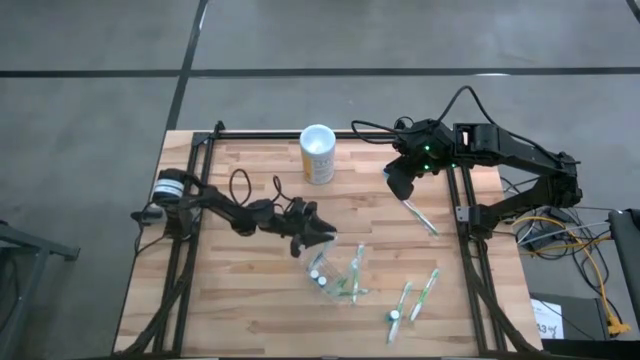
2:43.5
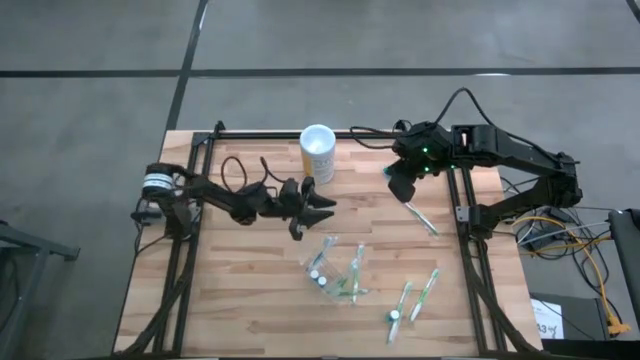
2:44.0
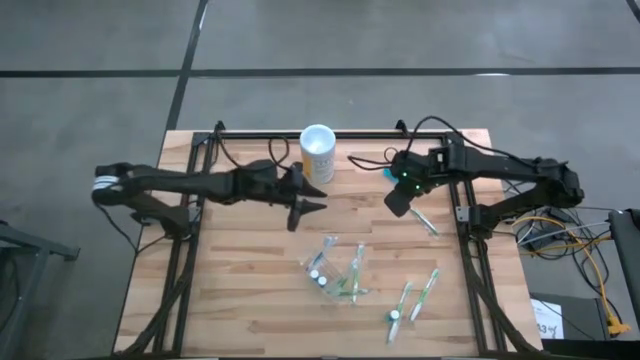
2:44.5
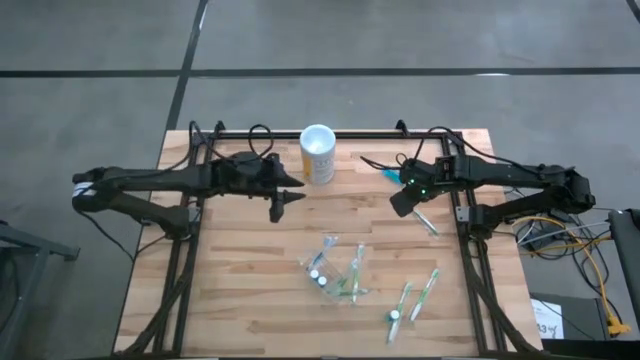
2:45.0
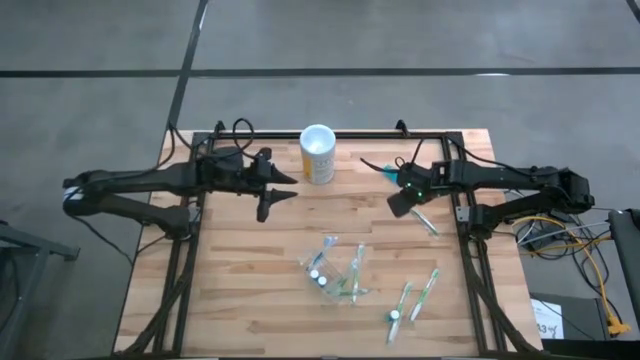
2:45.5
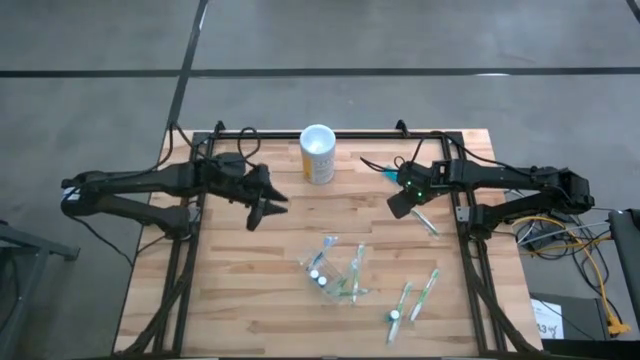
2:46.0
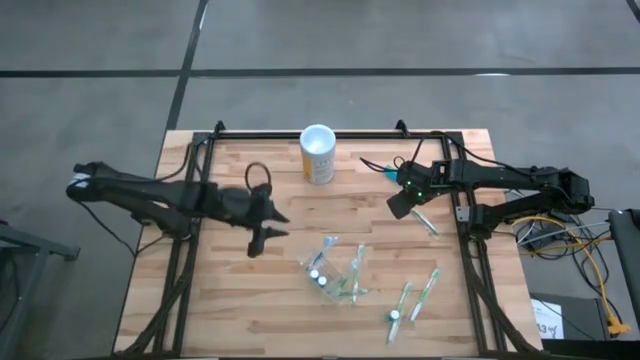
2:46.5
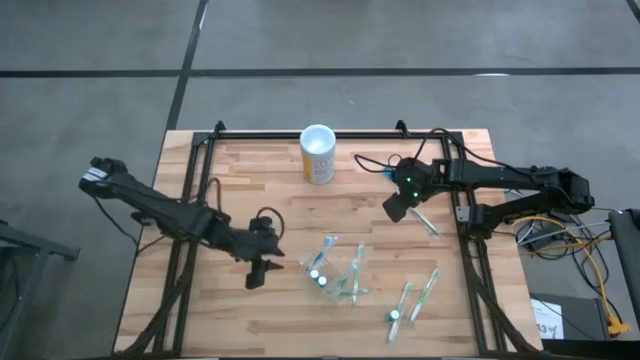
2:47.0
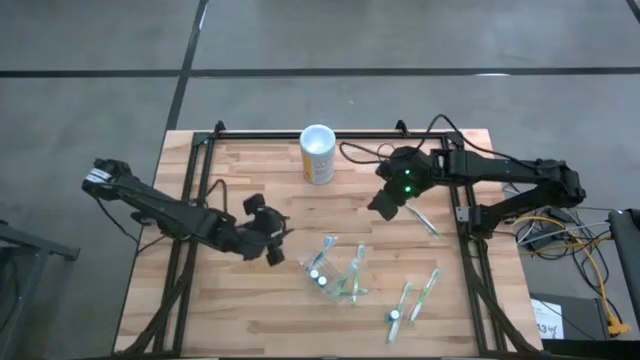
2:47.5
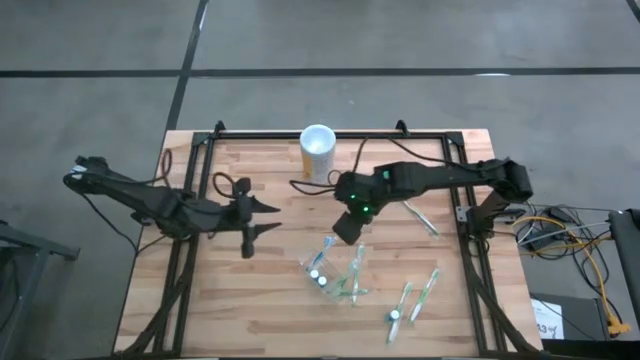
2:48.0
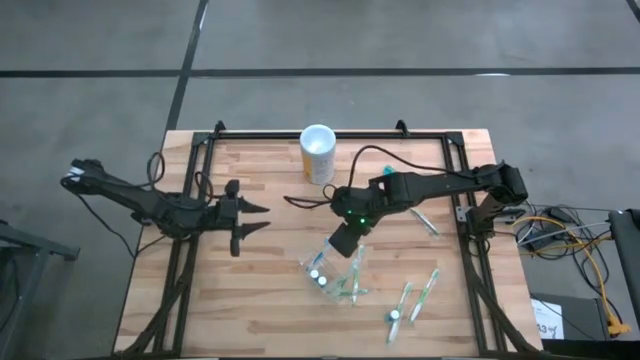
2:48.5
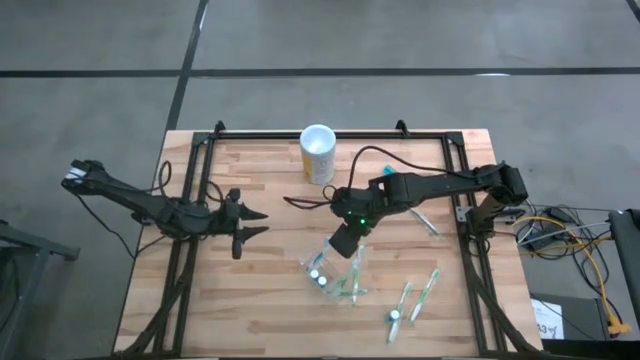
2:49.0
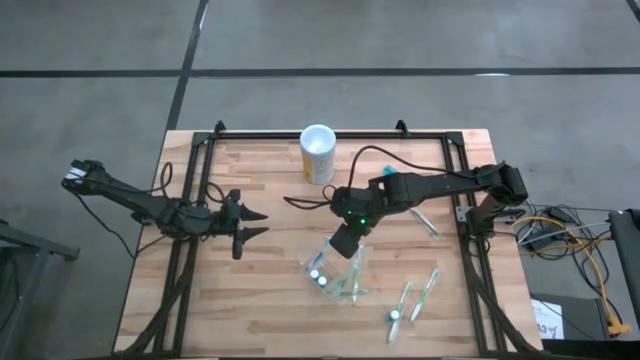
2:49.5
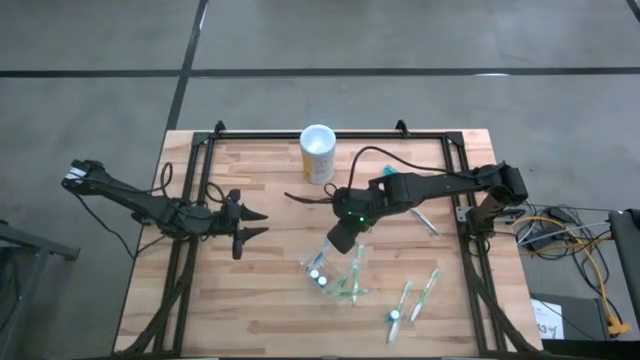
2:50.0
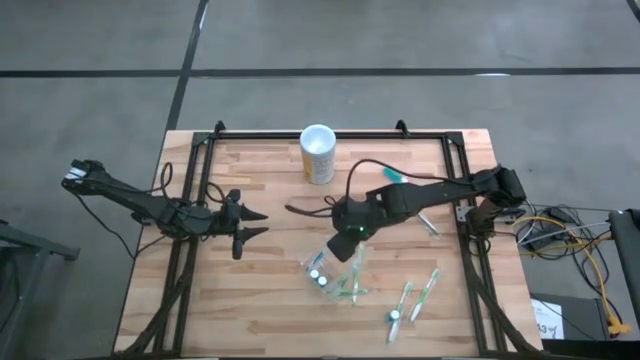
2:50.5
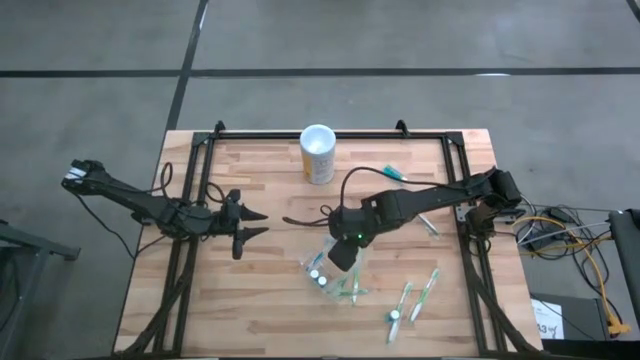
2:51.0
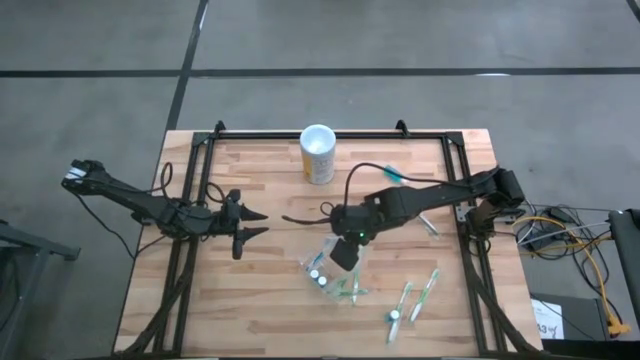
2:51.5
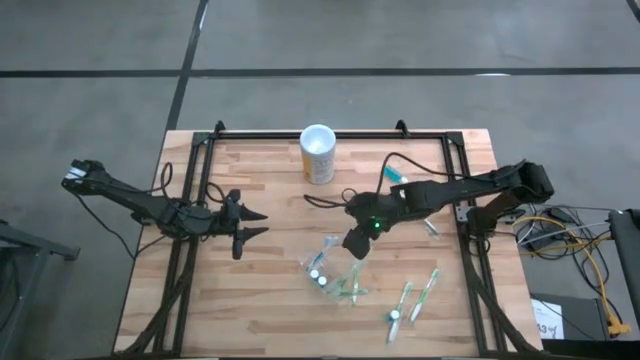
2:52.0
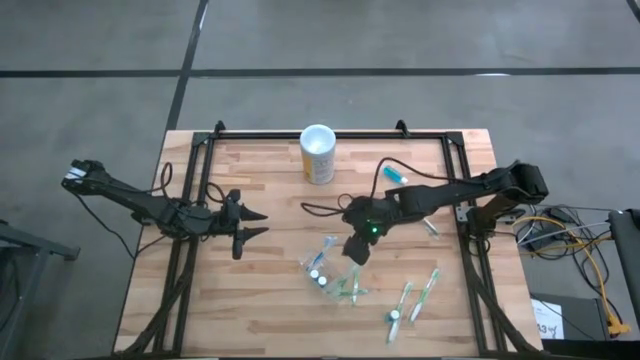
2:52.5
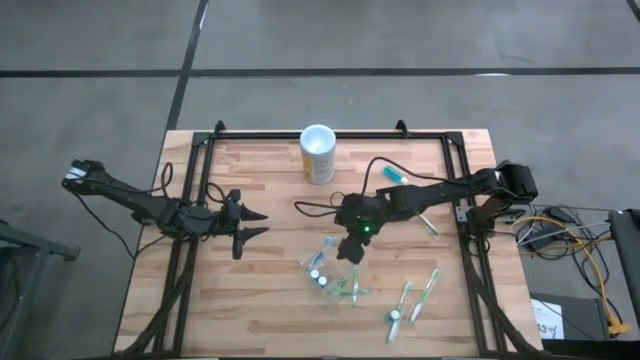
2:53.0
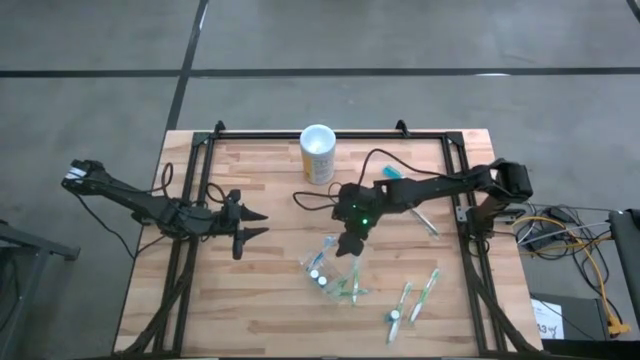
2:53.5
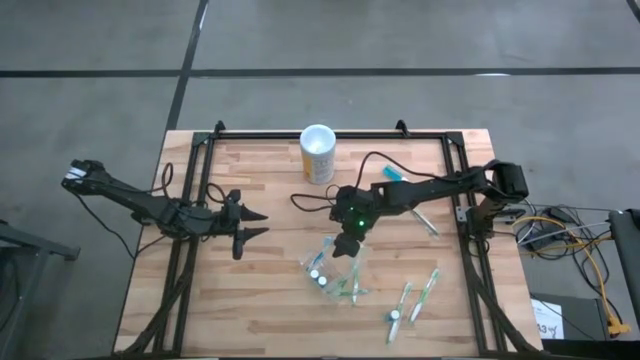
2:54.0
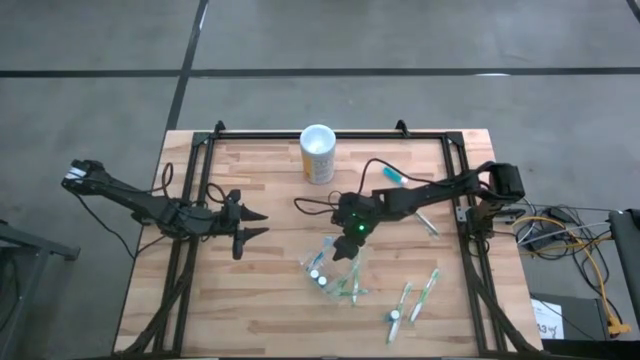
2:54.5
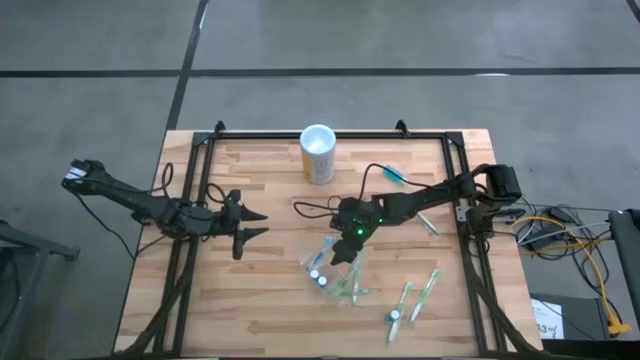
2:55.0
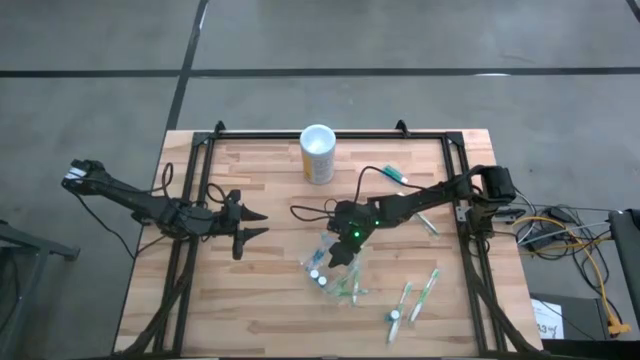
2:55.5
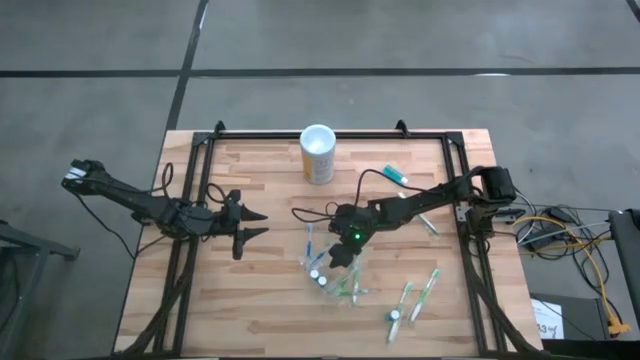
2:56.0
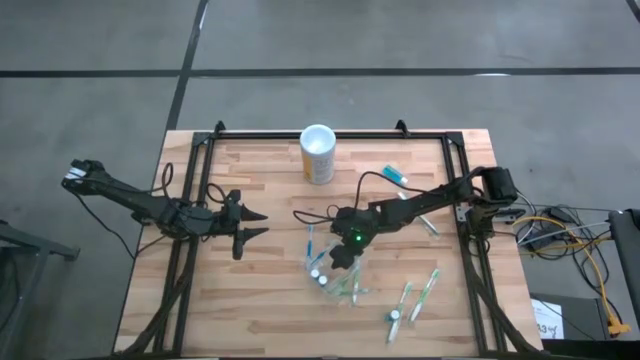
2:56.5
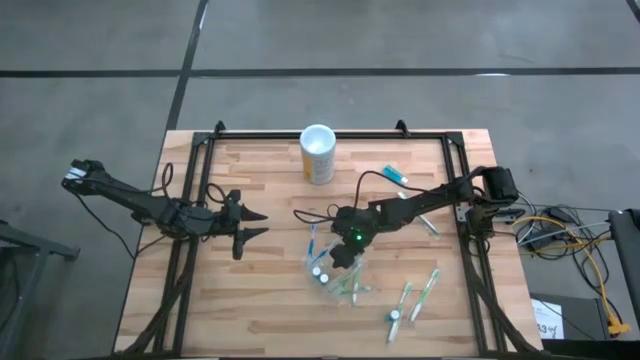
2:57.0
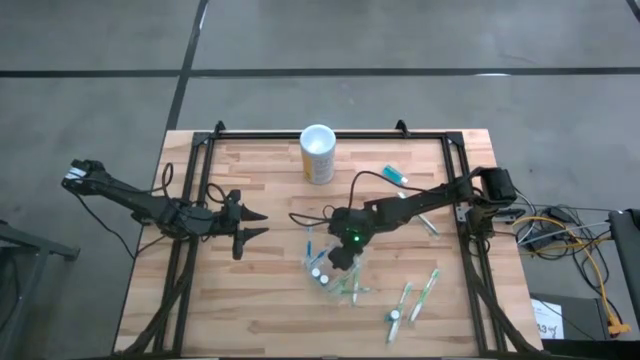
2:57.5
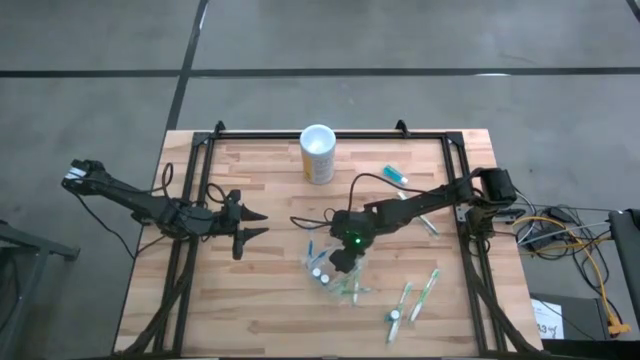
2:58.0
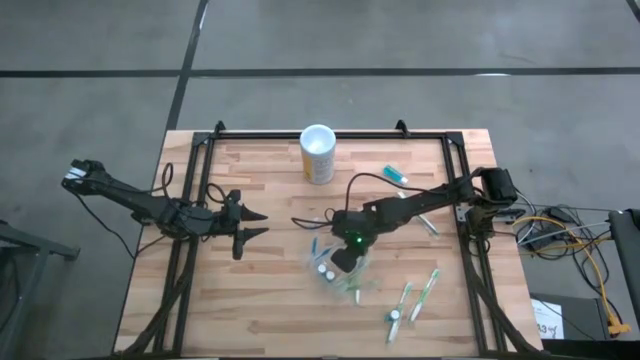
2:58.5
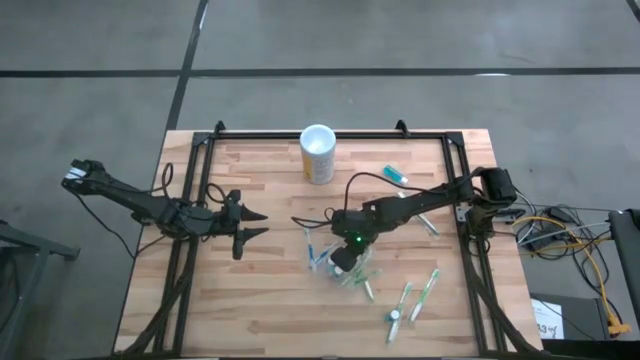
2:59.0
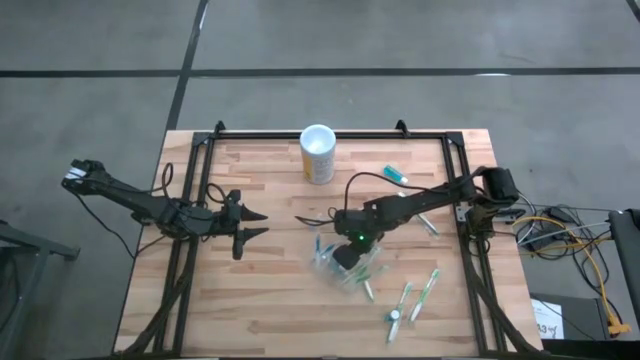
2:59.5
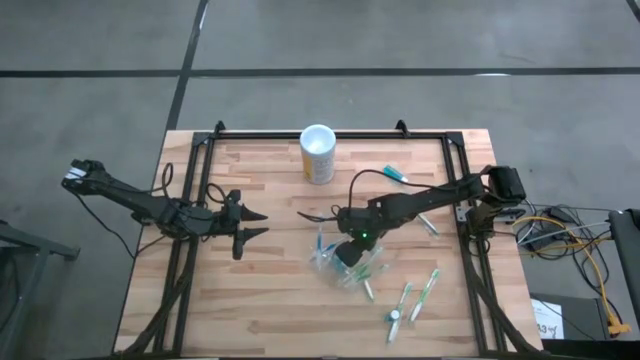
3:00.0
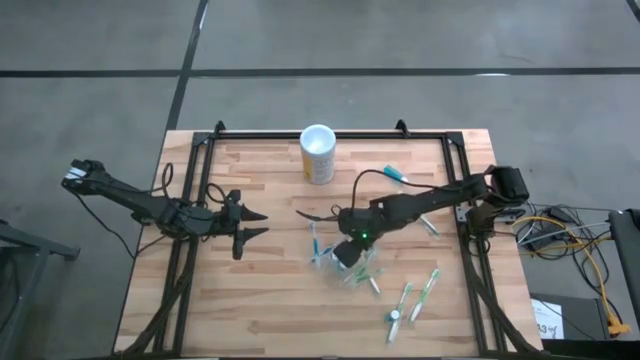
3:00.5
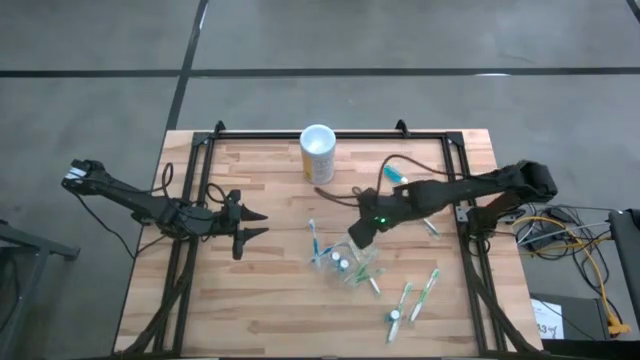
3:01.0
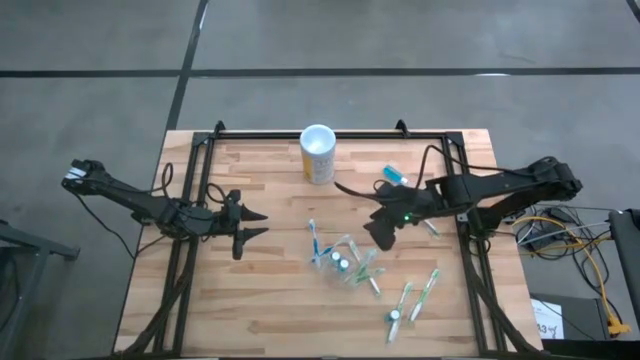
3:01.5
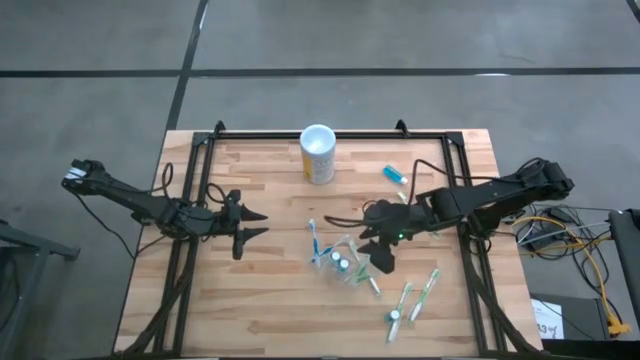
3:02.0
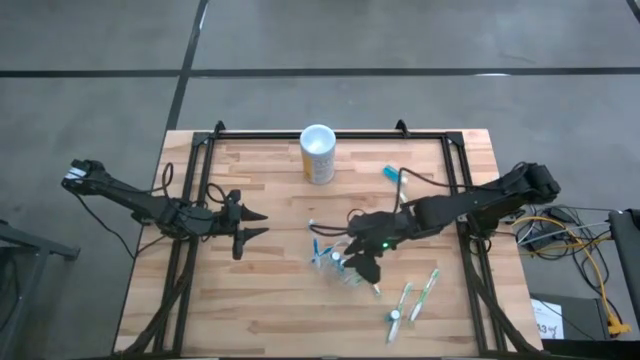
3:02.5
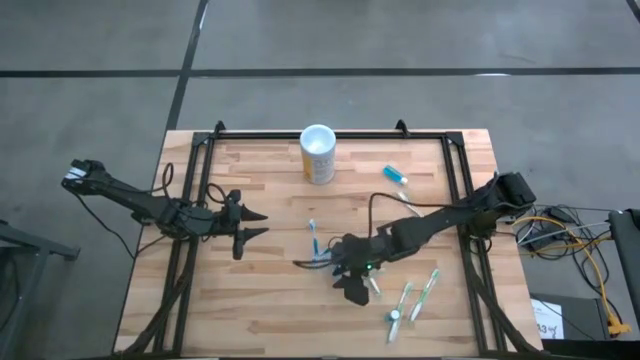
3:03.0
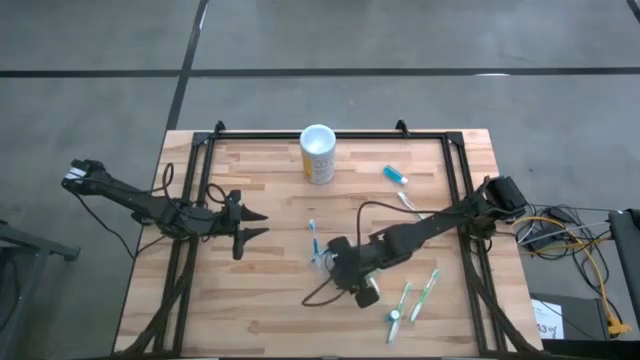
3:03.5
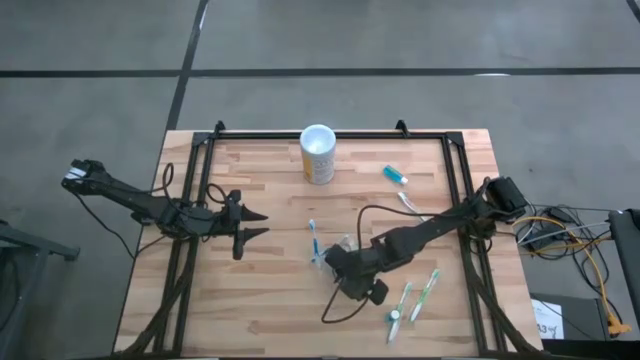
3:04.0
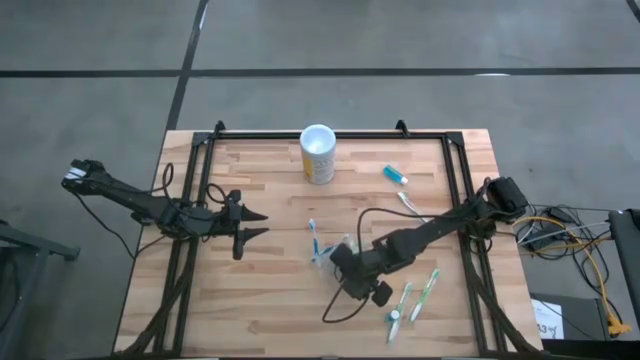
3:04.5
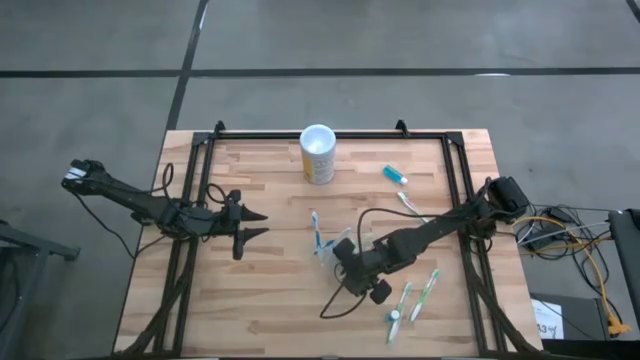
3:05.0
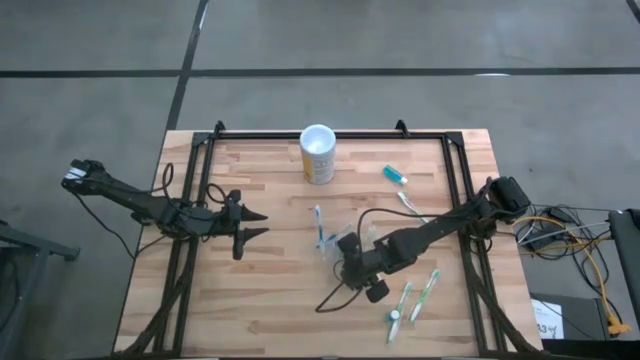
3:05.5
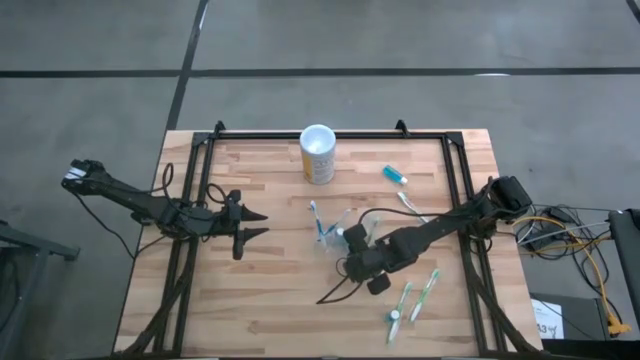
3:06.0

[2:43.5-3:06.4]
Task: Pick & Place toothbrushing station
Adjust the transparent organizer on the table
